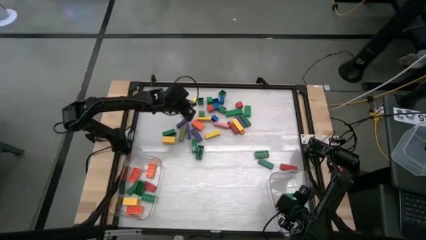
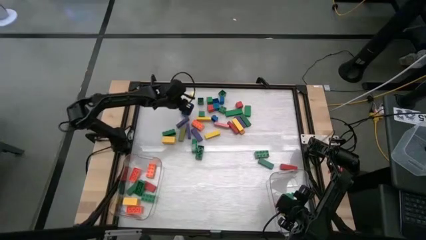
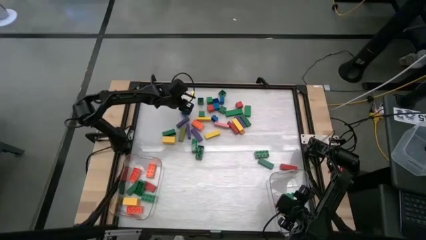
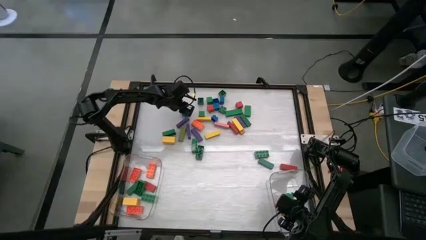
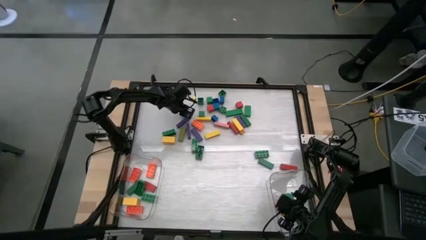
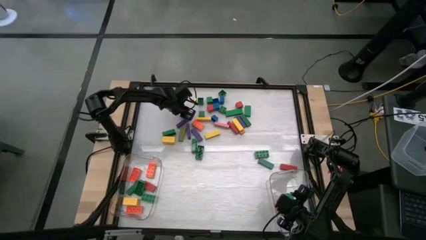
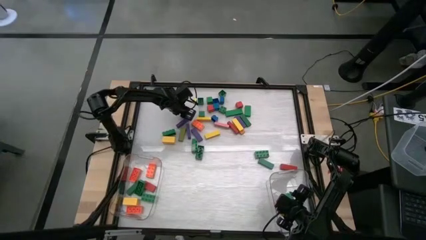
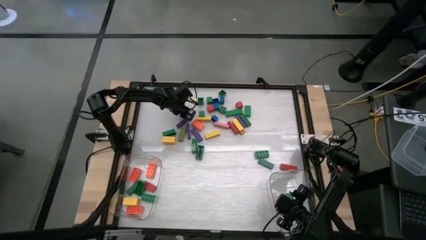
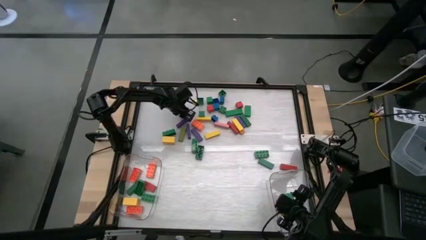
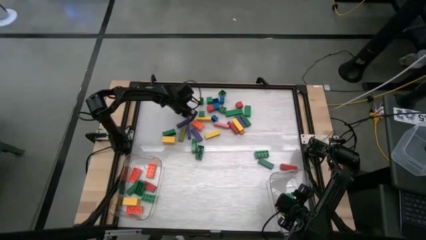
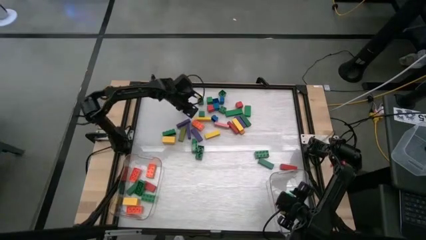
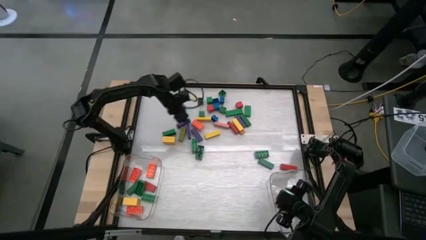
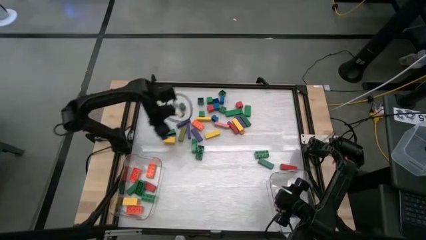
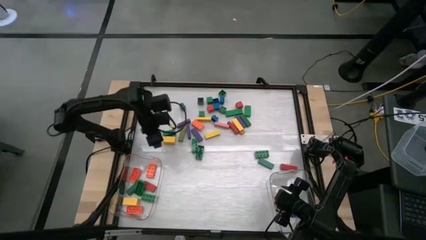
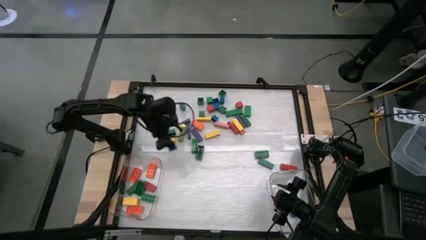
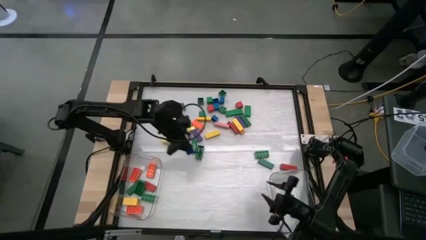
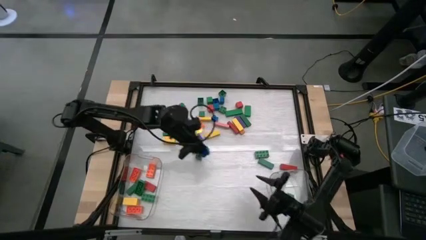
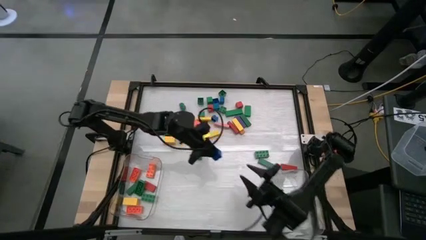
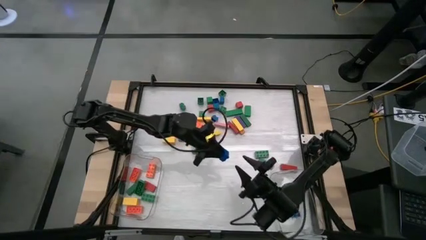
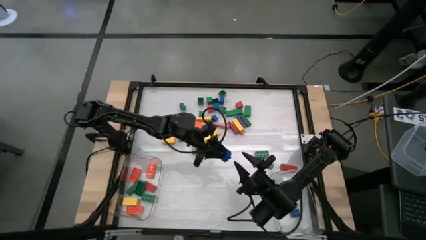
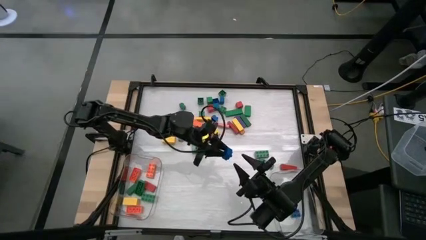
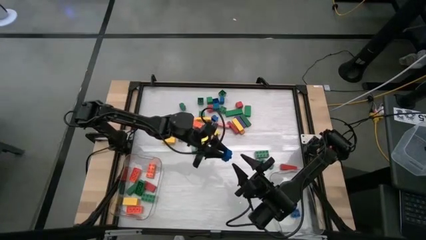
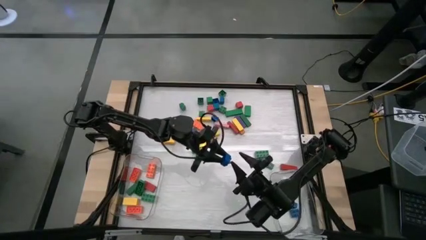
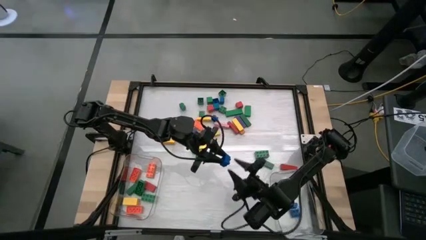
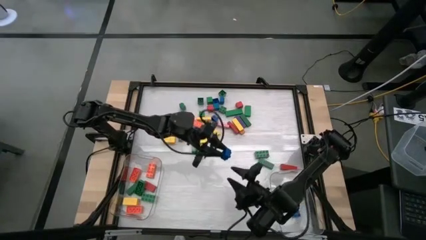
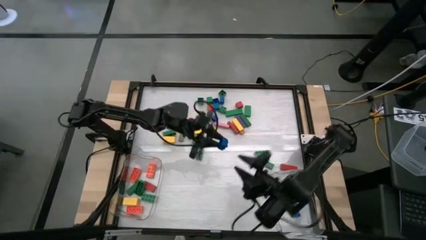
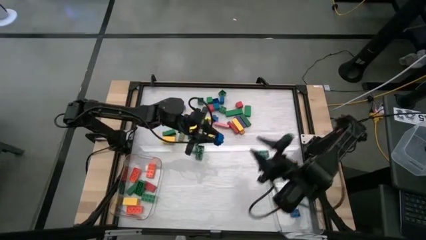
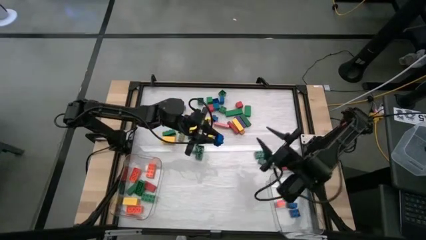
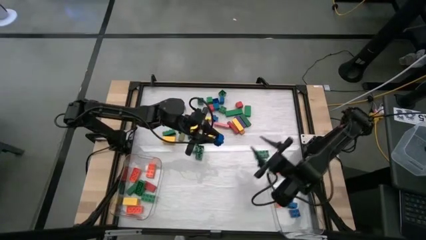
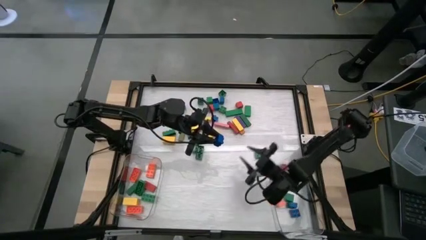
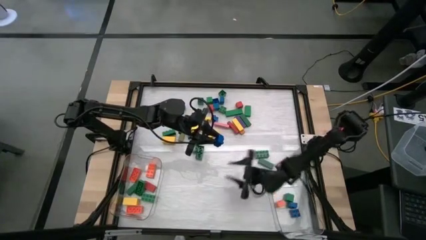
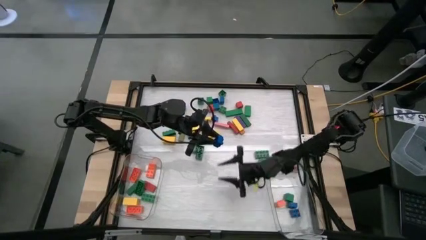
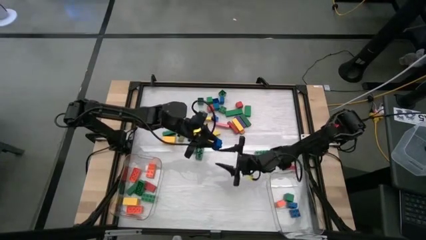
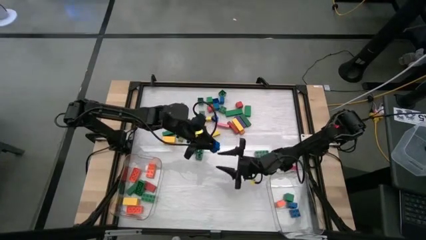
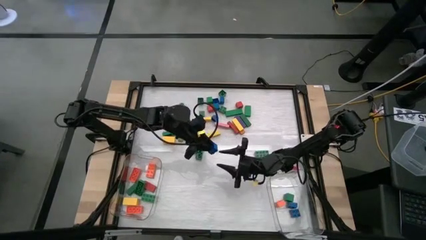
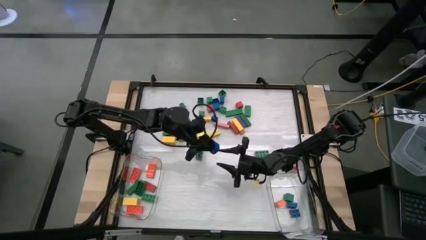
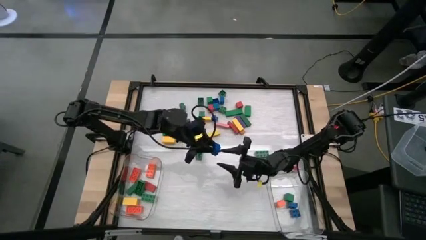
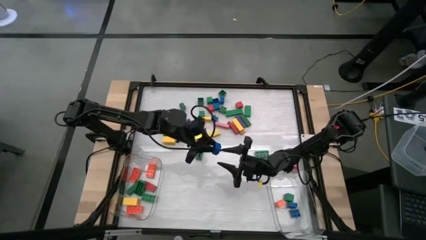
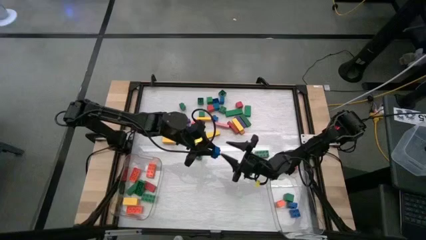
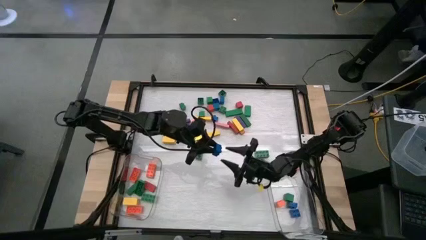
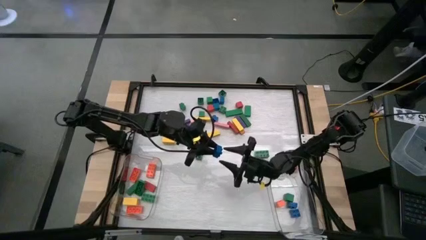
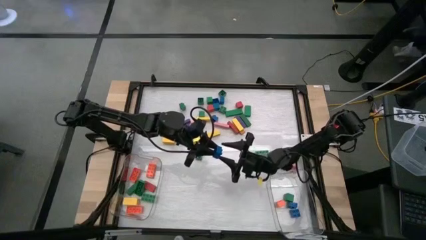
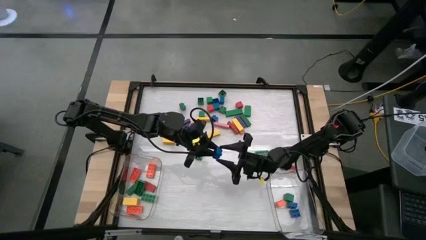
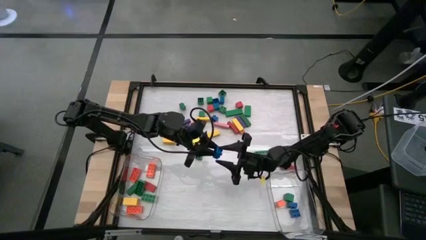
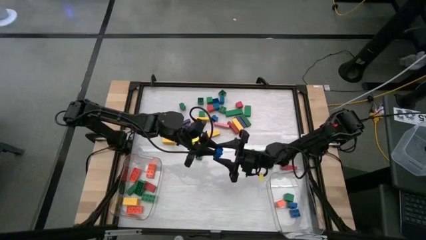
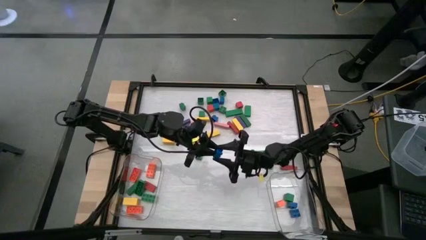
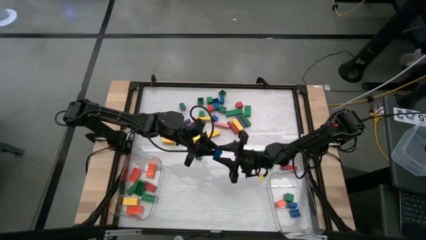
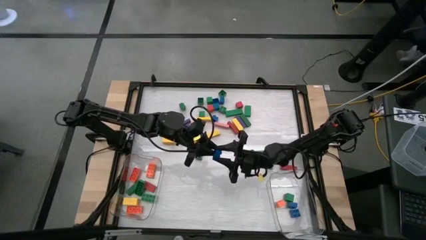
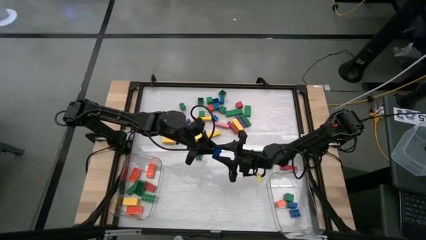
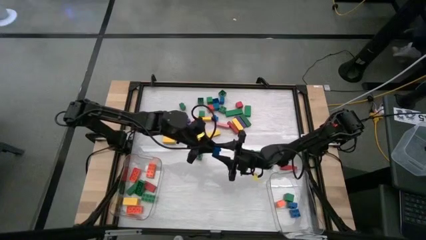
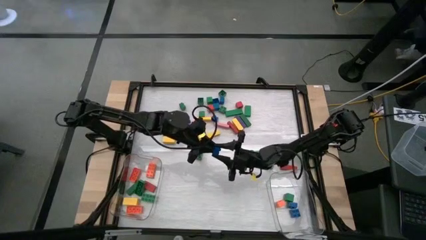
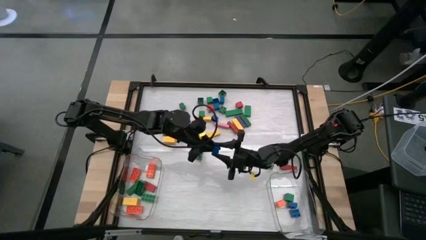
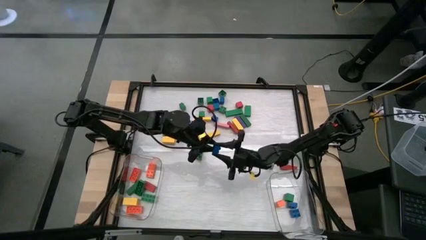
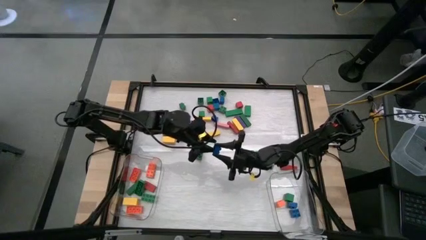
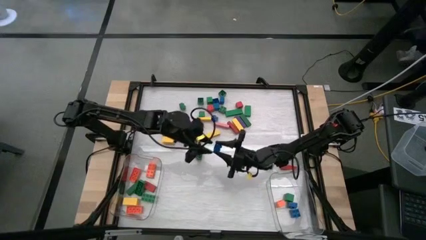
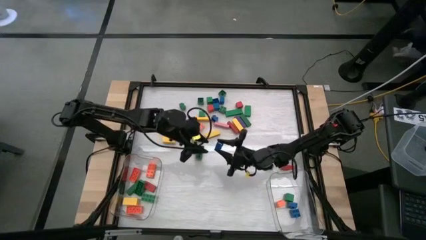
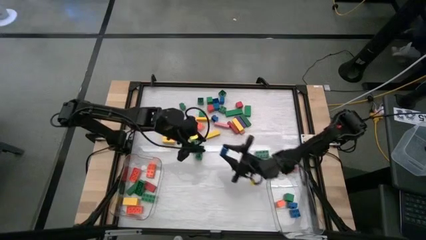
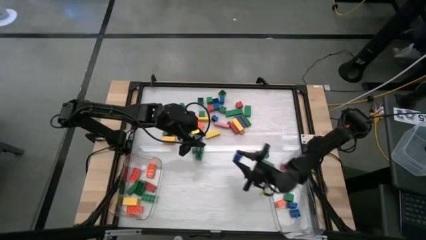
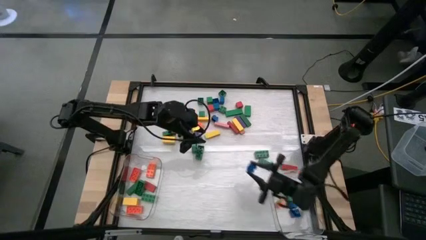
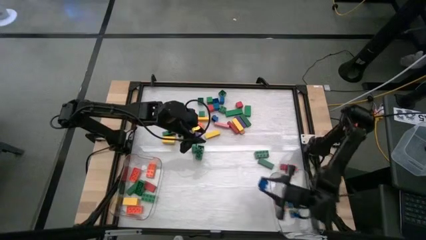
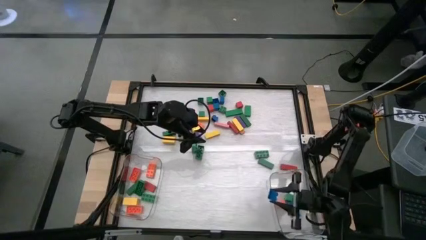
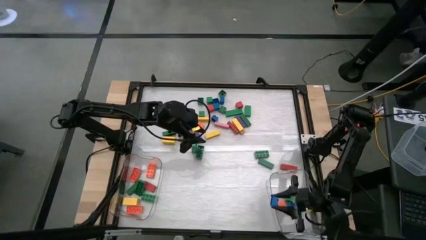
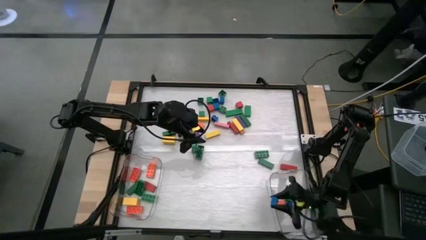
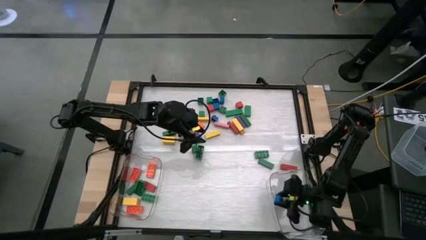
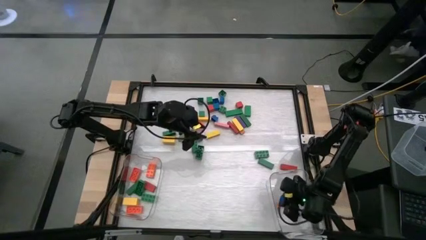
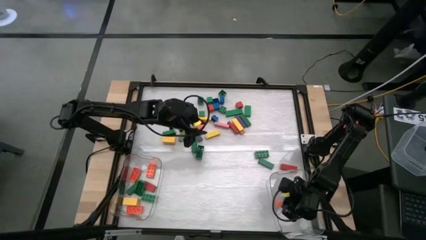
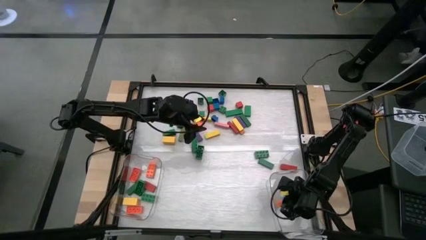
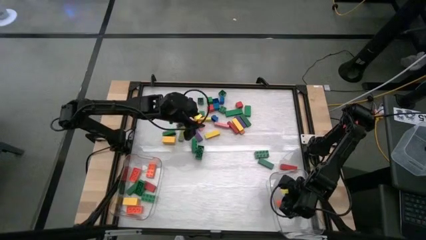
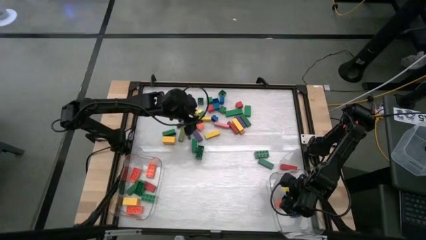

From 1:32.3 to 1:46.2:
Task: Sort blocks by size
Put the small blue game piece into the right transparent bin

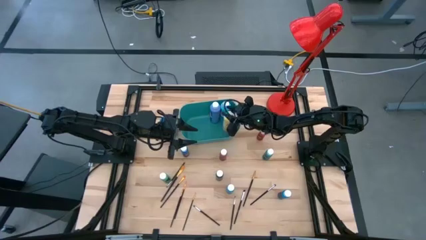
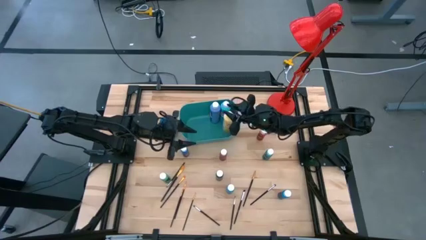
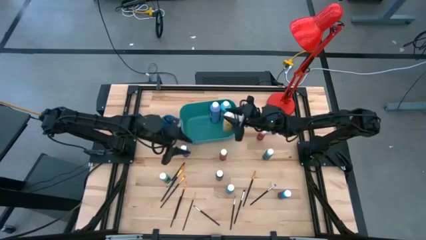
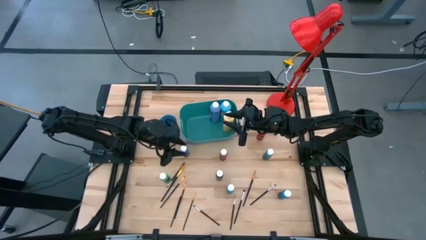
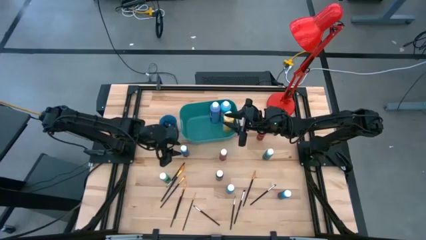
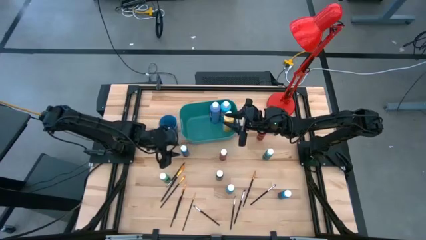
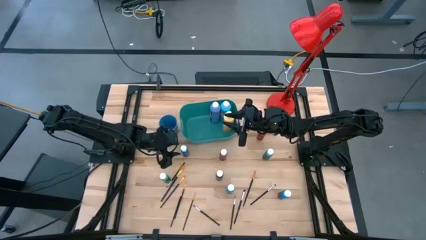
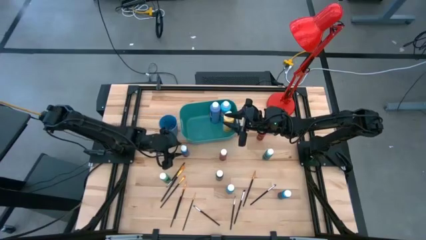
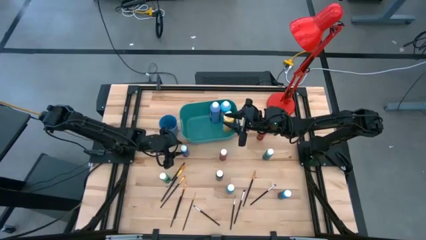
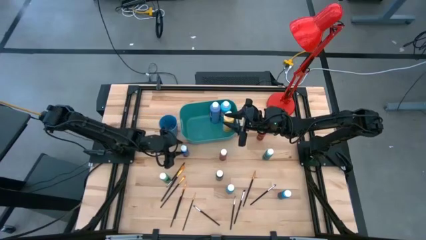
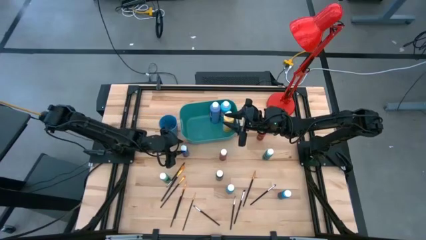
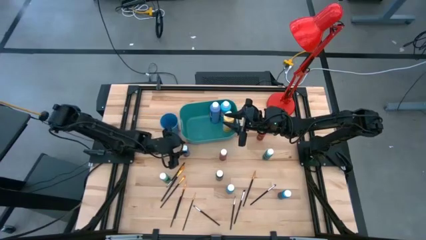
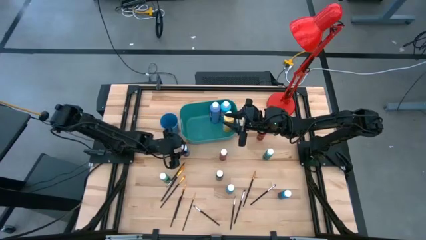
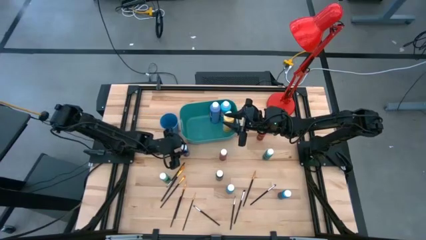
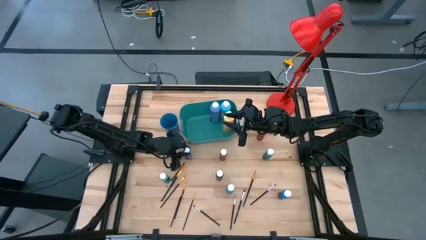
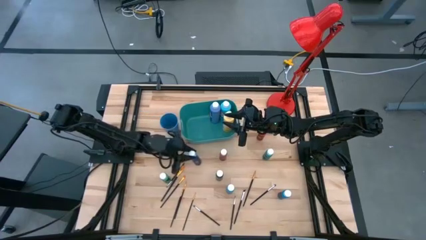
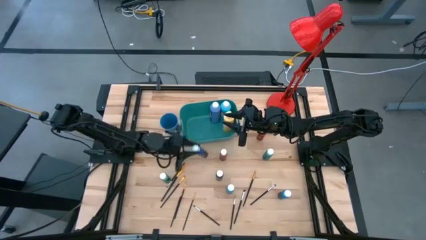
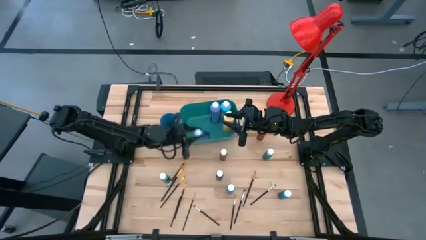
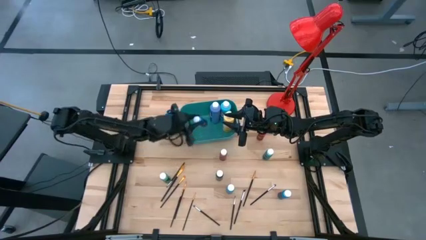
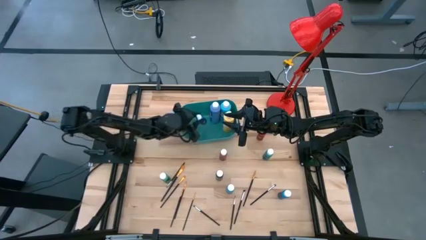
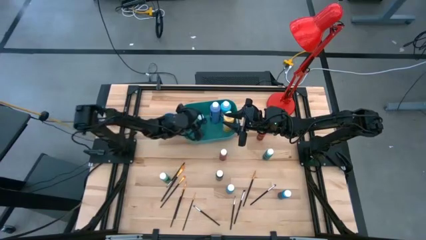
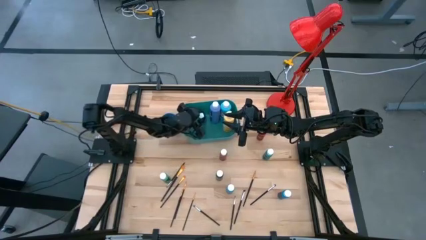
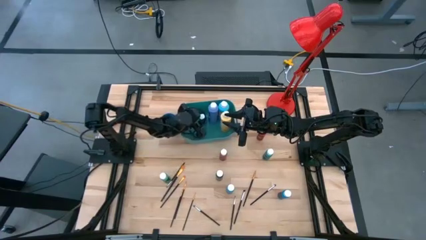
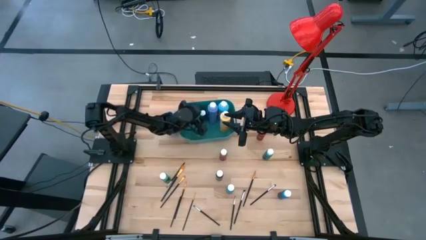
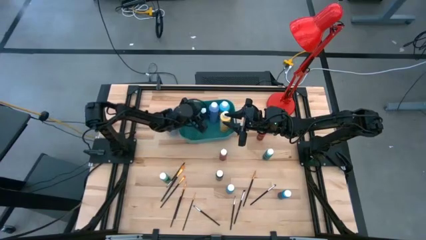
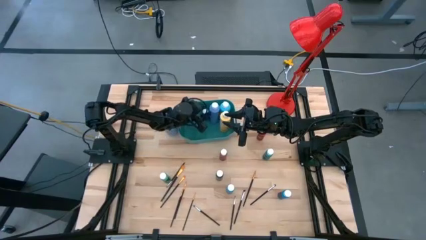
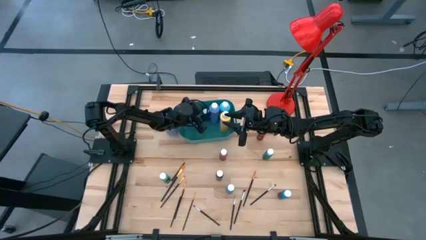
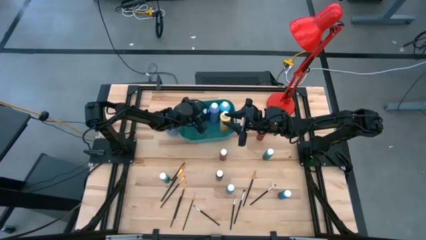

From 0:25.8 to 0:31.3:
Task: Pick & Place Paint Supplies
Put the small dark blue paint bottle into the green bin
